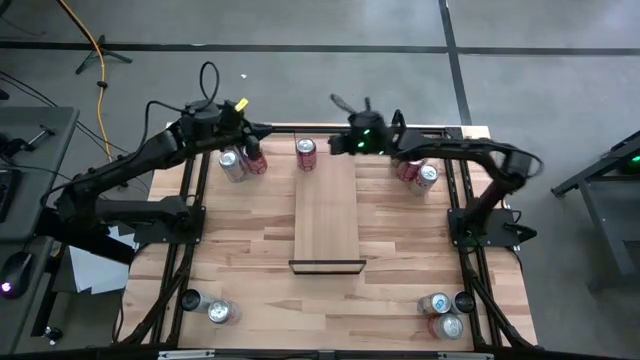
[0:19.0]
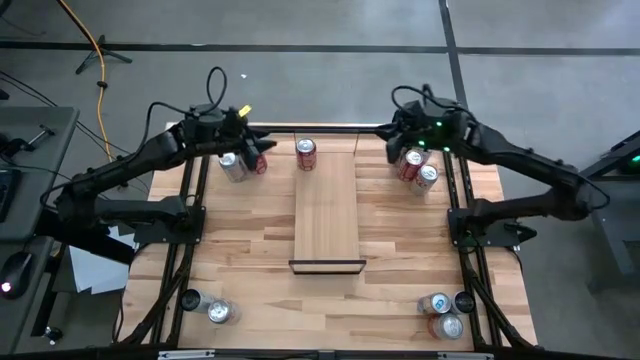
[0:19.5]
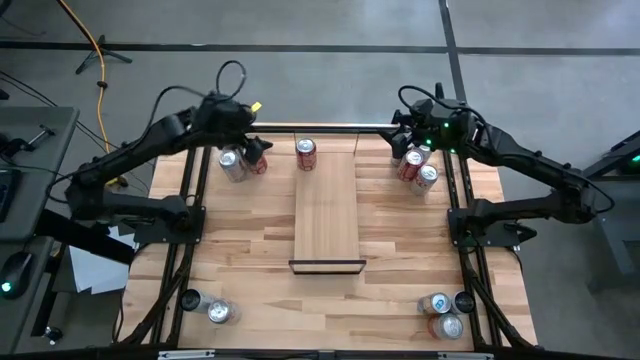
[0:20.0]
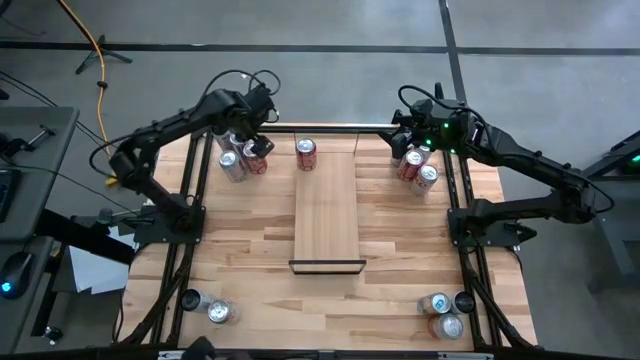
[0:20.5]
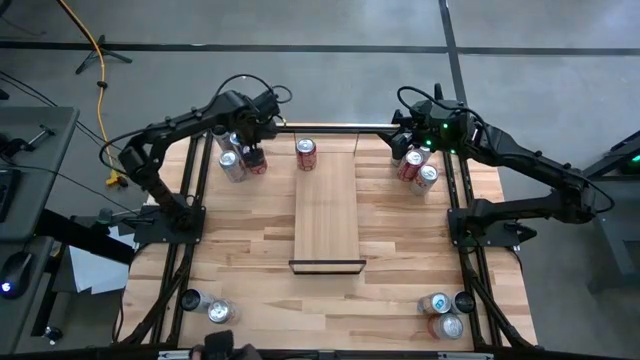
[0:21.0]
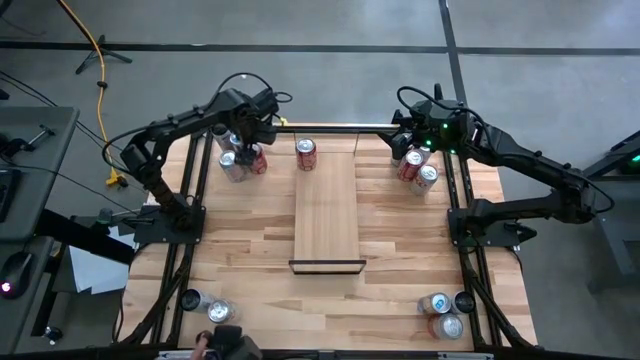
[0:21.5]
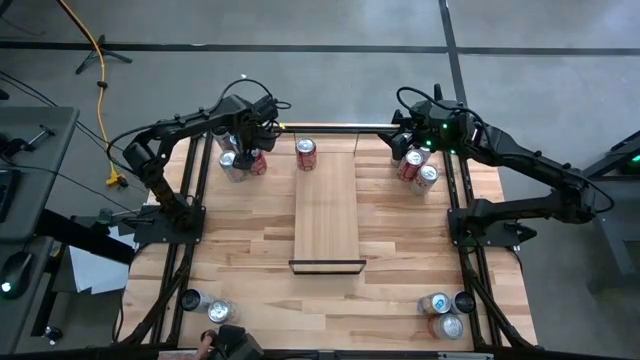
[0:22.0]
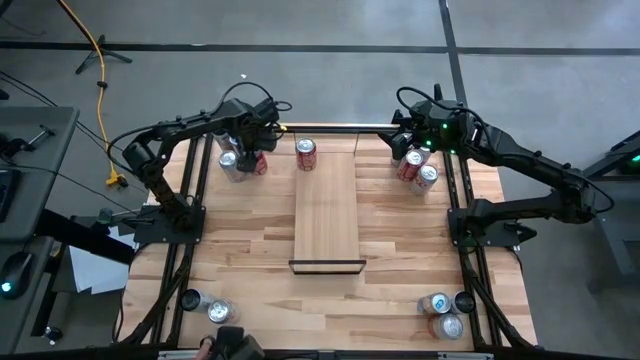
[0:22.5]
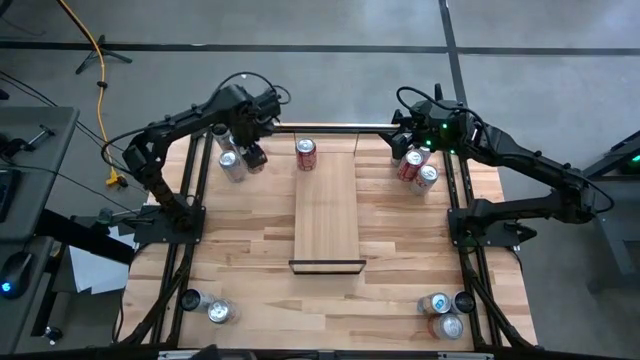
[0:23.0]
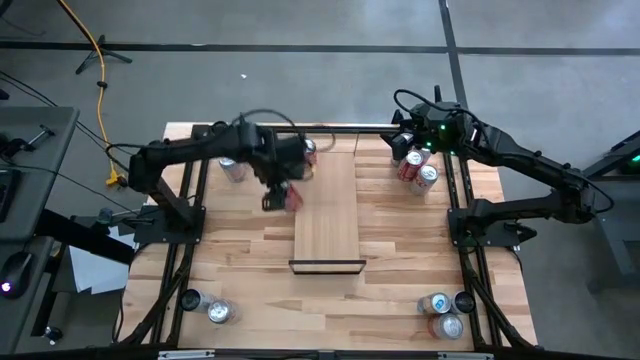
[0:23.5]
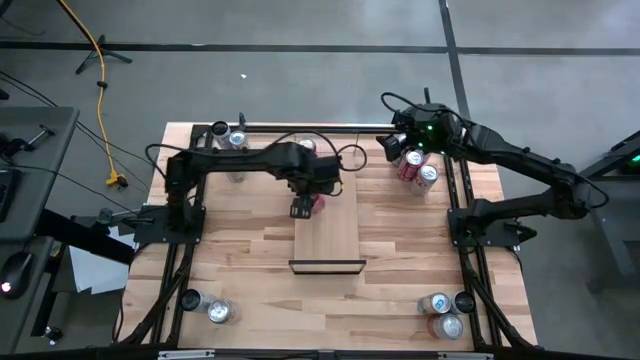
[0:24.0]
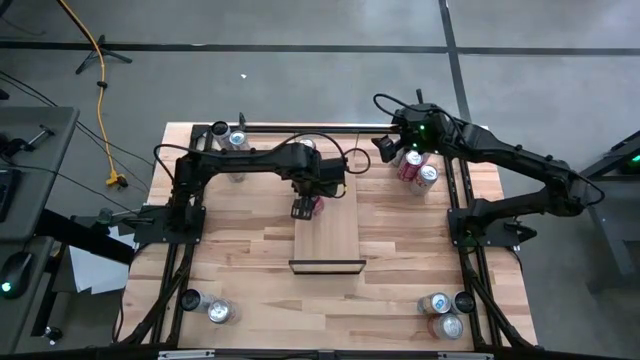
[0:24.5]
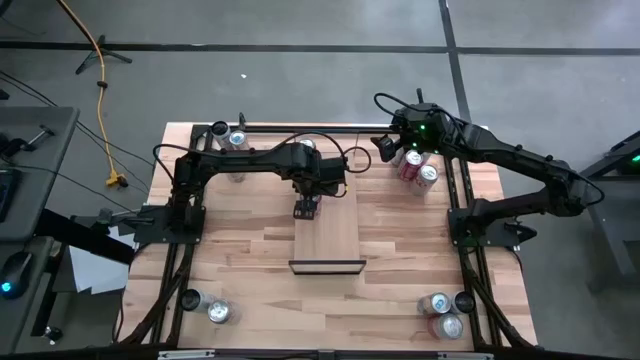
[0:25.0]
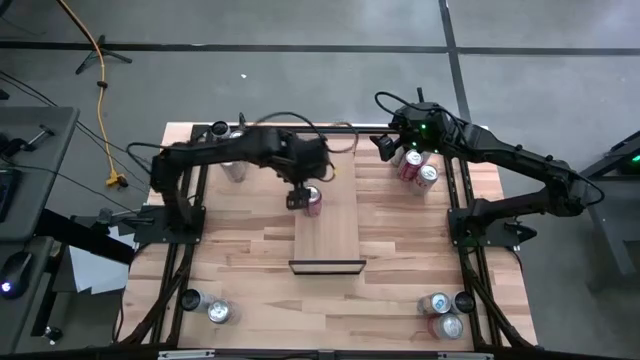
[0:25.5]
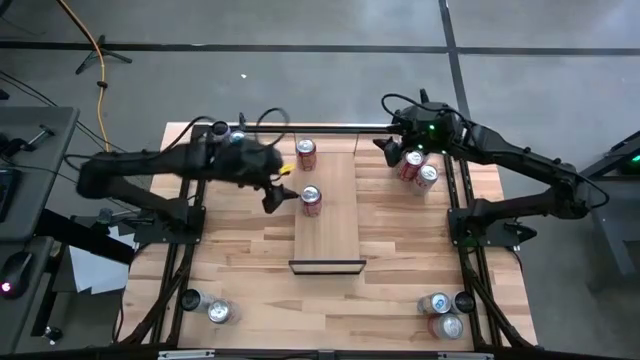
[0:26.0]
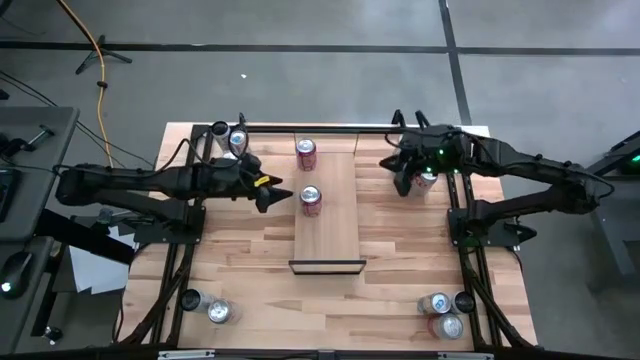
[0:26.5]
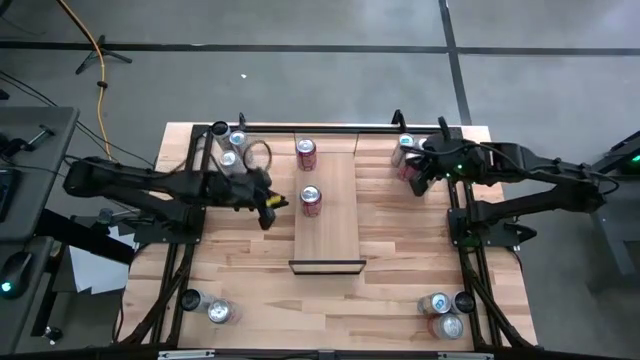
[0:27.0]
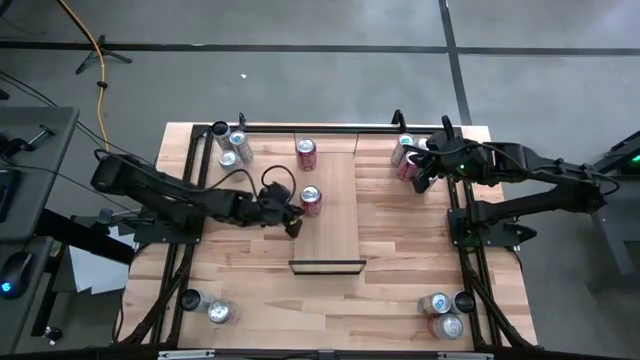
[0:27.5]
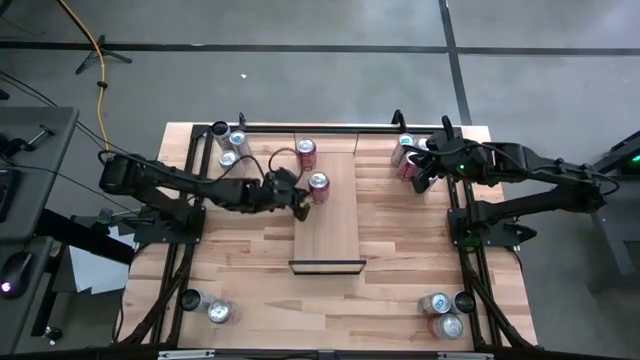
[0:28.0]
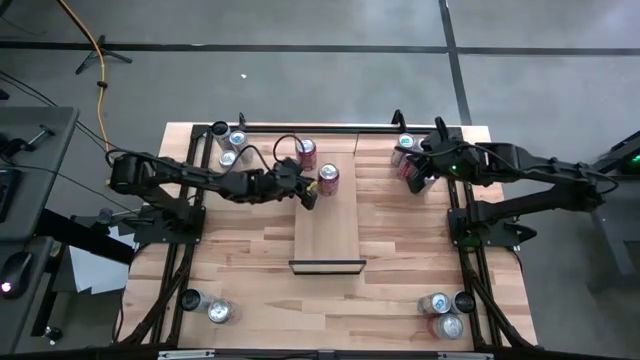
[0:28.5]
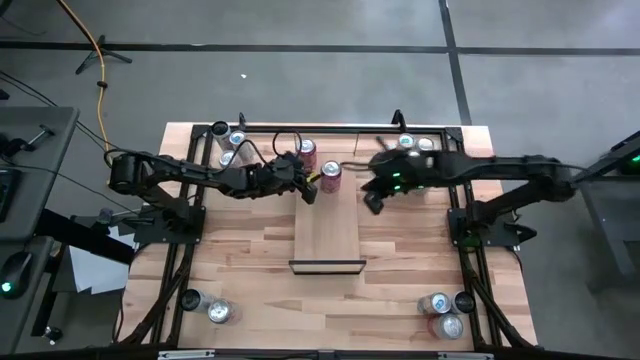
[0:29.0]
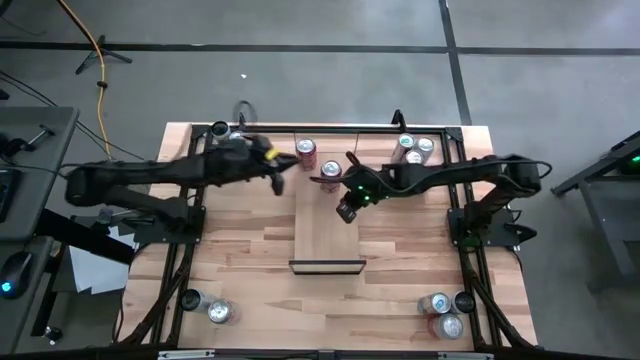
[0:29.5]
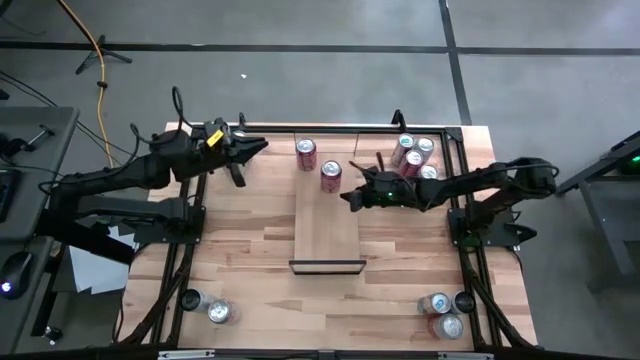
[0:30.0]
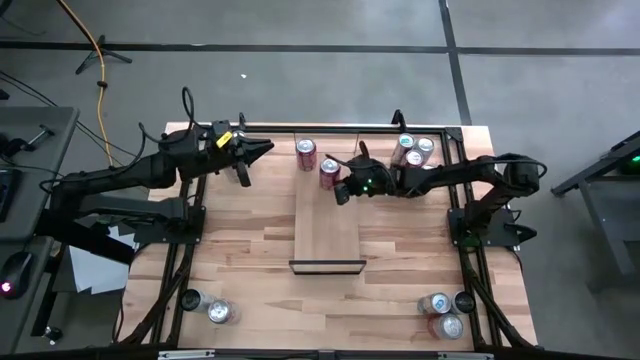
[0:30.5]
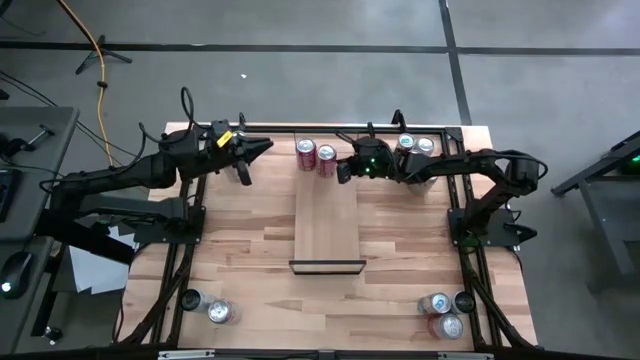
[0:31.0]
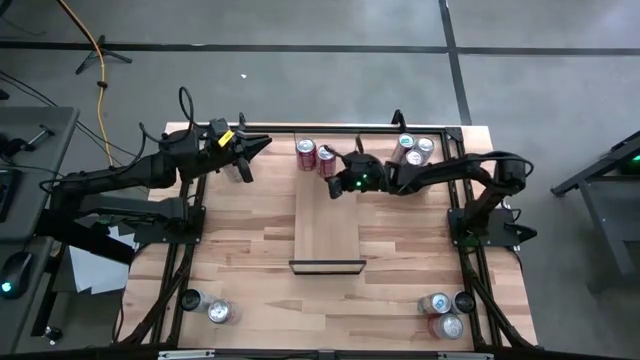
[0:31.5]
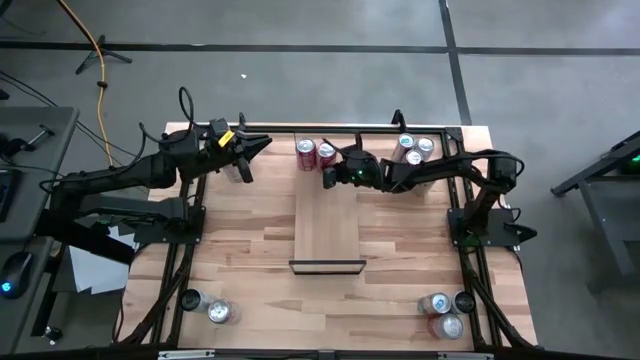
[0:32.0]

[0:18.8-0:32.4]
Task: Place canned beverage on shelf
Put the left red soda can on the shelf aligned with the other red soda can

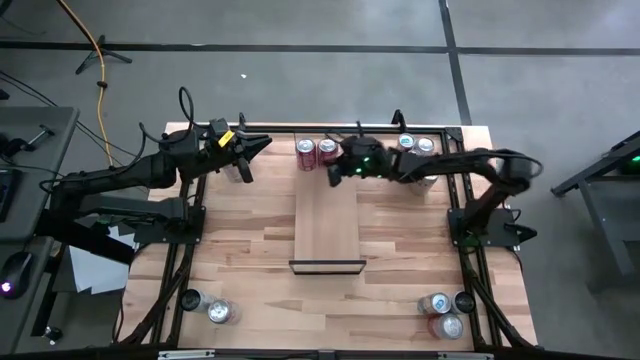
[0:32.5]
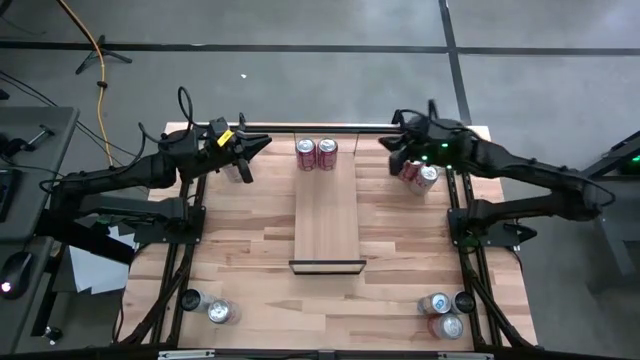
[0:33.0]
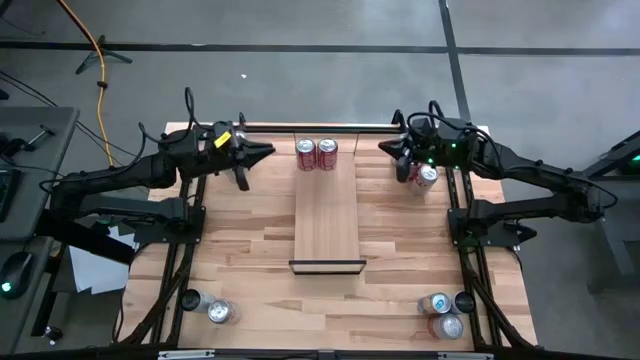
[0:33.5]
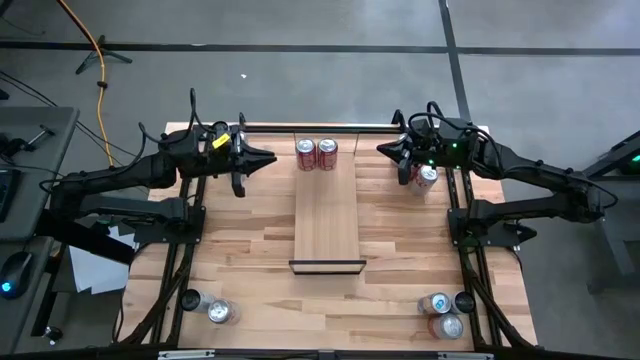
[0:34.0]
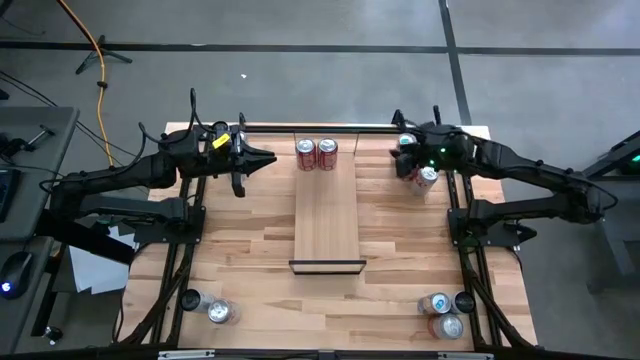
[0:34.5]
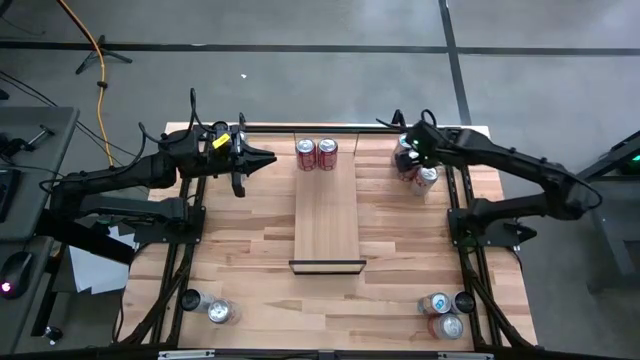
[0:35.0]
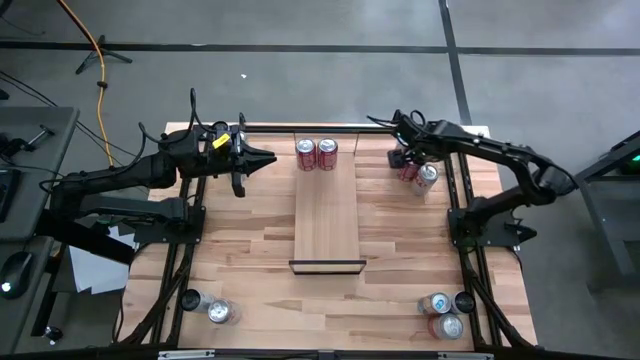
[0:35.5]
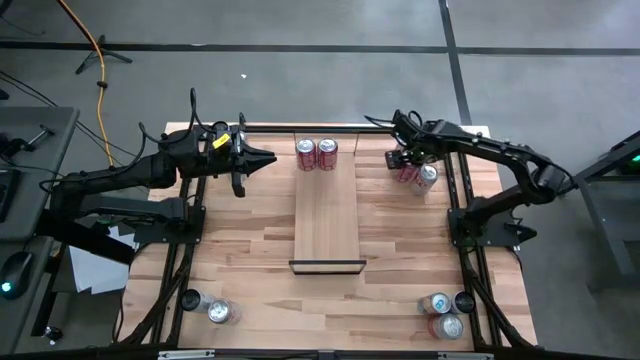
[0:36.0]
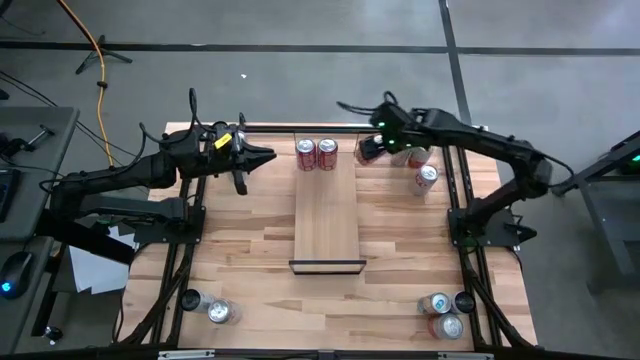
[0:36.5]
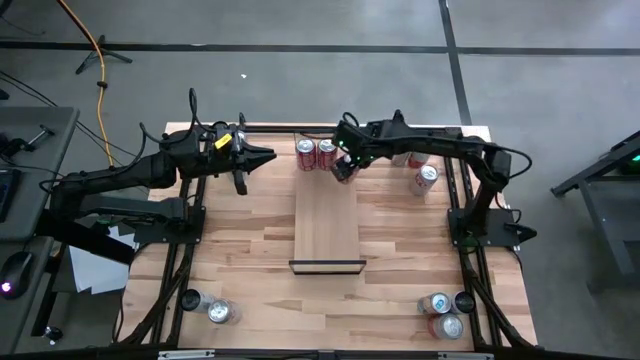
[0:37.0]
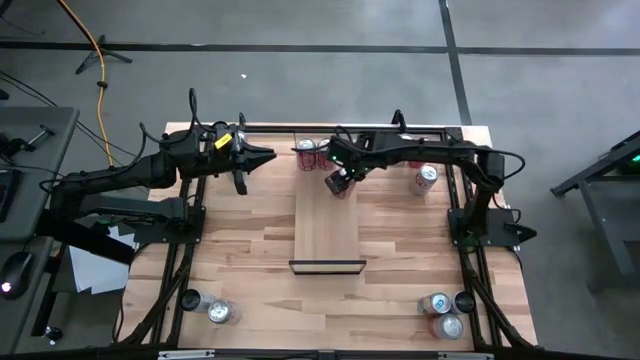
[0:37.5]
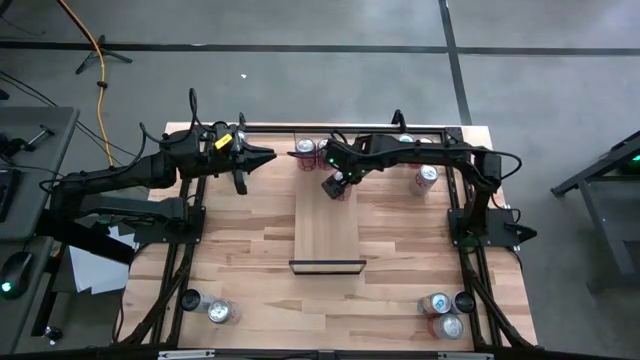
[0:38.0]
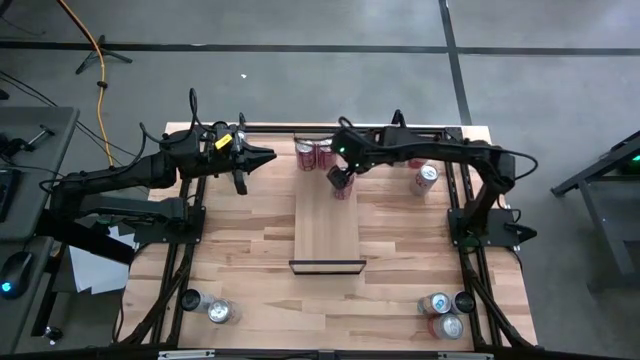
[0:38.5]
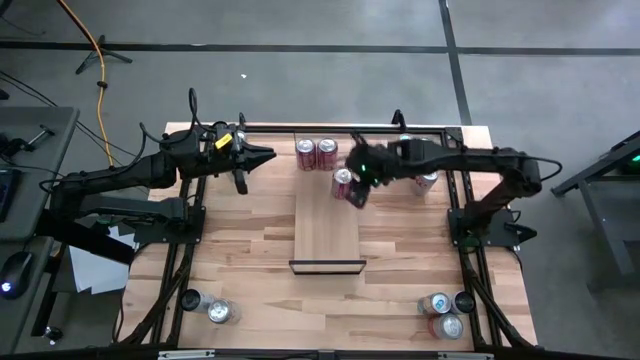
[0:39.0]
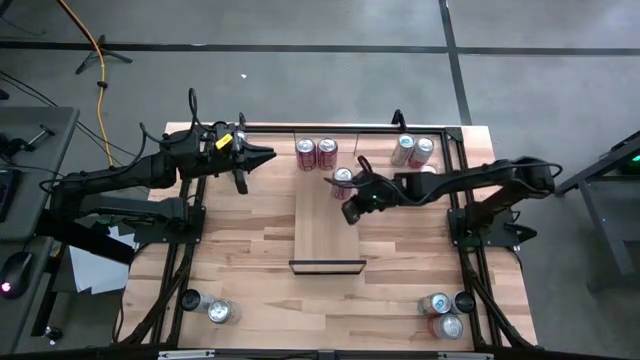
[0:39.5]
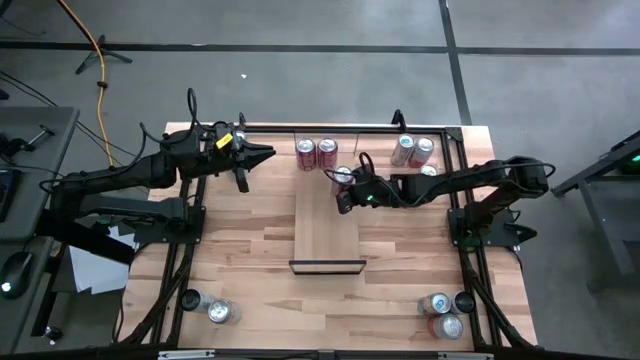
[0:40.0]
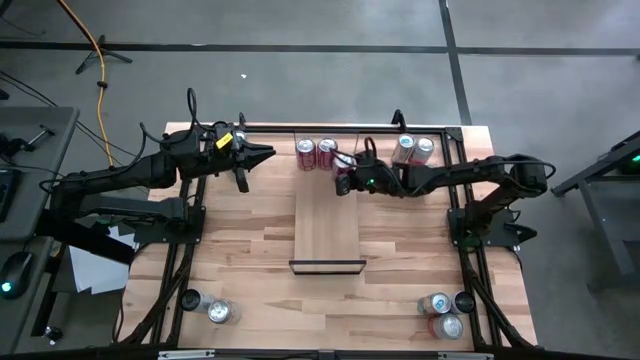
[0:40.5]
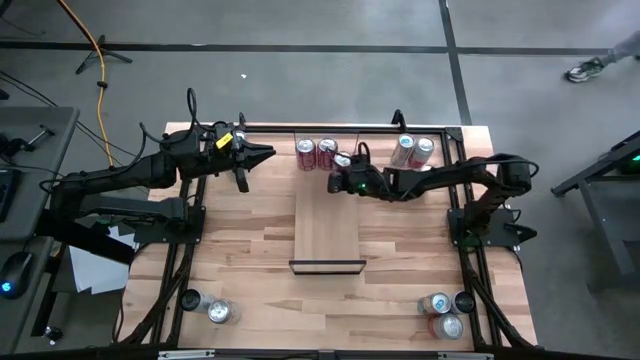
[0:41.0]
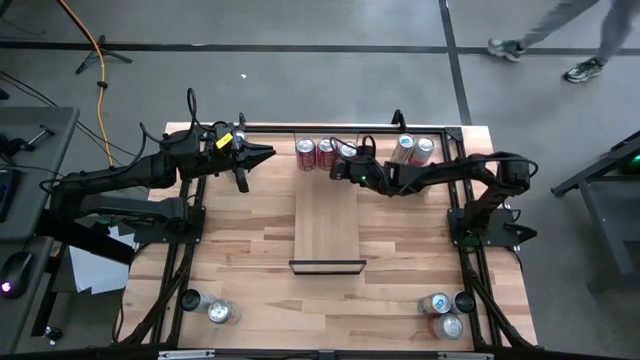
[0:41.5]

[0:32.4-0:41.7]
Put the red soda can on the shelf aligned with the other red soda cans
